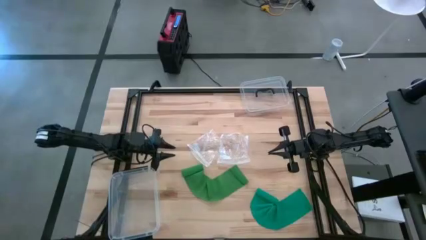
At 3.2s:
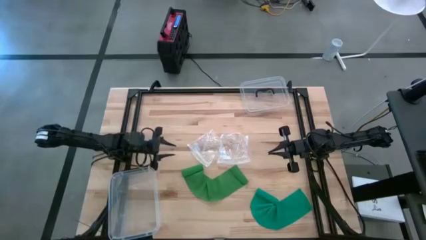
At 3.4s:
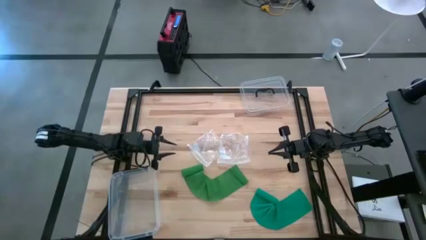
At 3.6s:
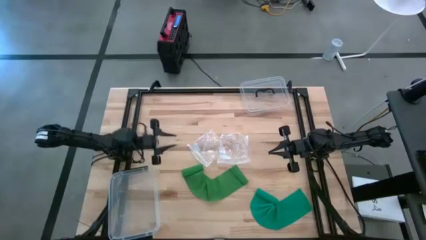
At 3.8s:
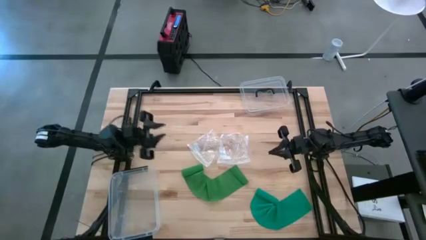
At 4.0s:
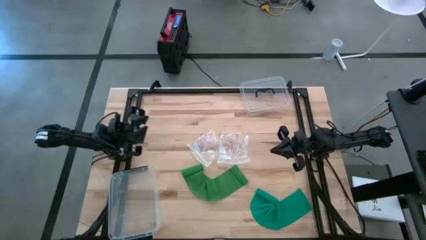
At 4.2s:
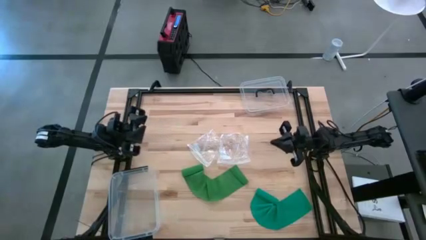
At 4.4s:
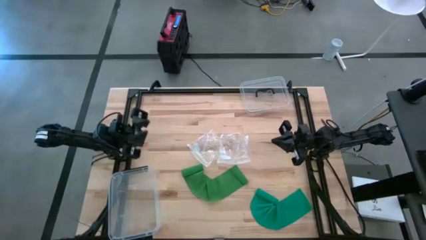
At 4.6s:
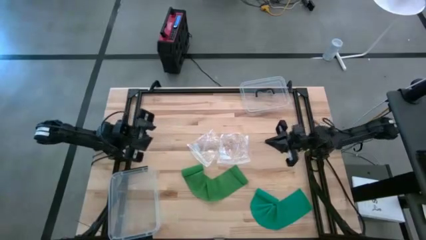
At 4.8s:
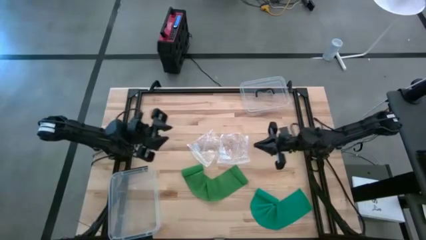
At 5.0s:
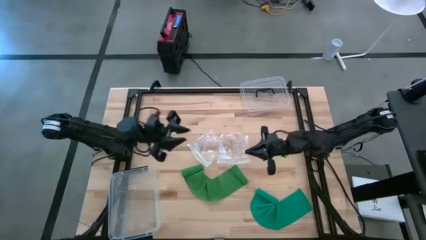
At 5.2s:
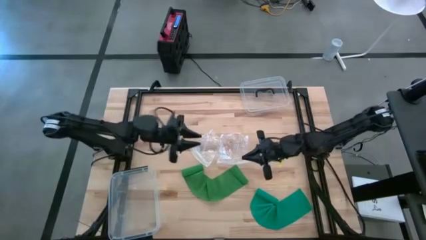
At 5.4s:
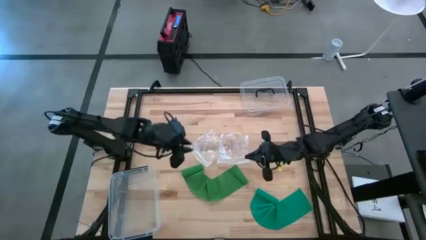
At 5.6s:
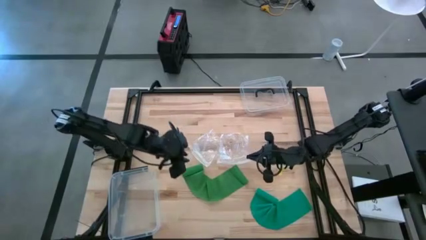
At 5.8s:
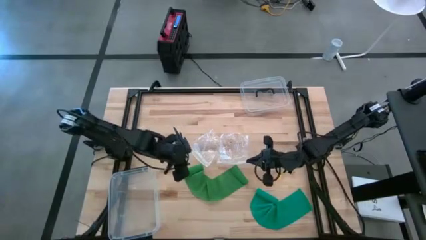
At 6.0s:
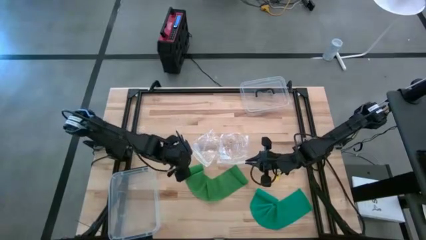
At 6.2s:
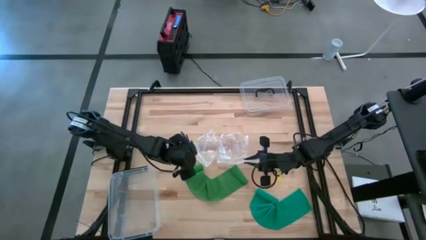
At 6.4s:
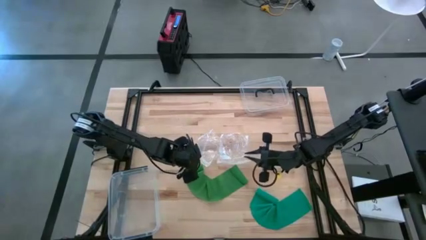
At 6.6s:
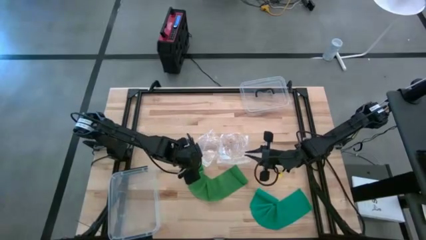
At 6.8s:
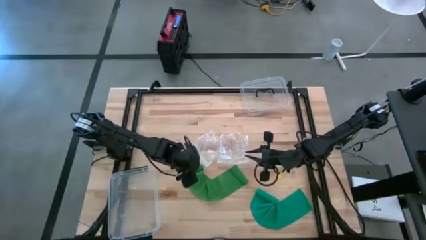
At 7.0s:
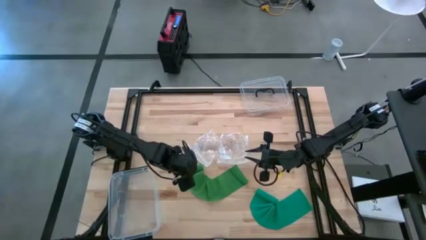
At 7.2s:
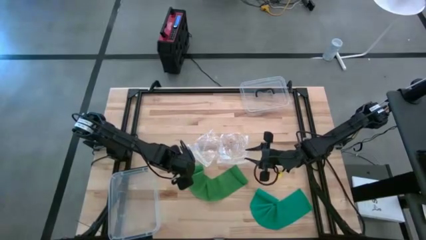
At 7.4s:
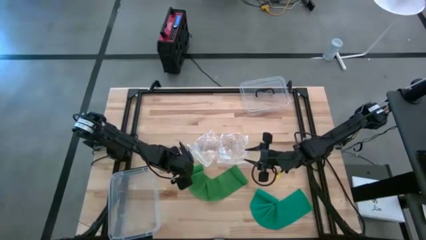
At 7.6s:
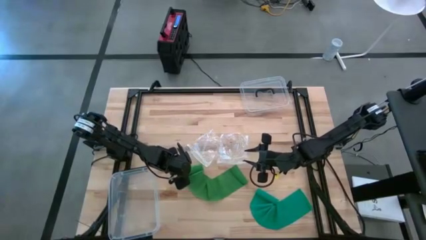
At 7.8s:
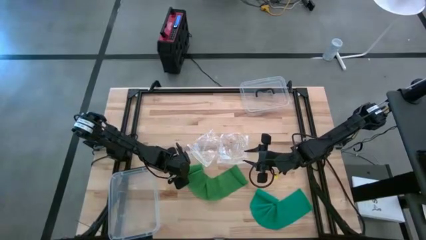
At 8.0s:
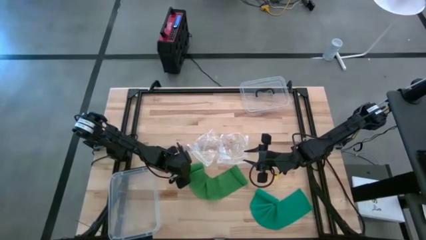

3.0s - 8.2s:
Task: Roll bandage
Roll the green bandage

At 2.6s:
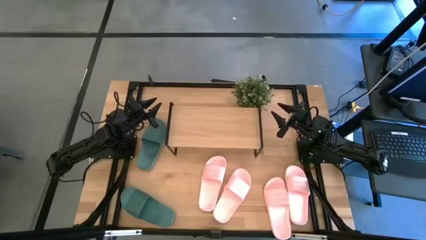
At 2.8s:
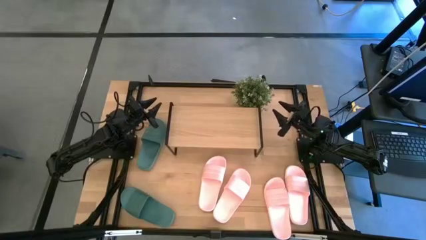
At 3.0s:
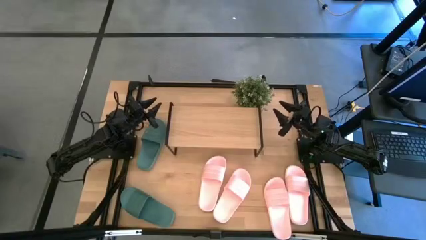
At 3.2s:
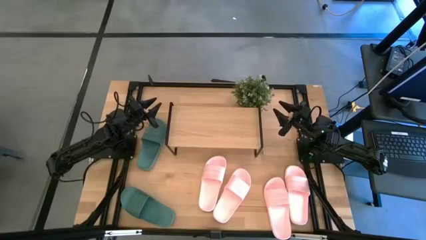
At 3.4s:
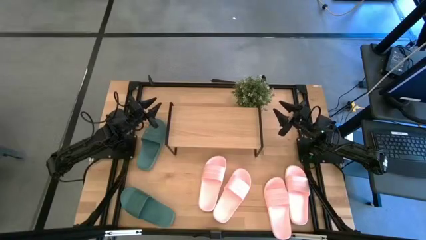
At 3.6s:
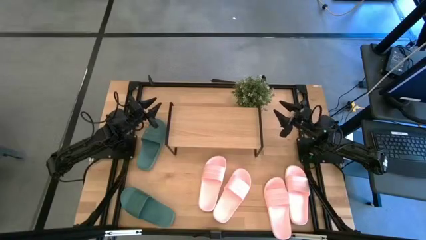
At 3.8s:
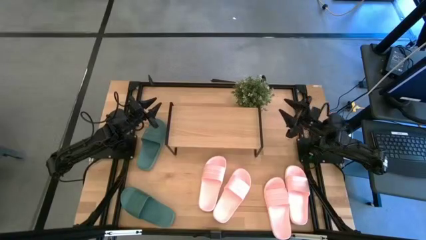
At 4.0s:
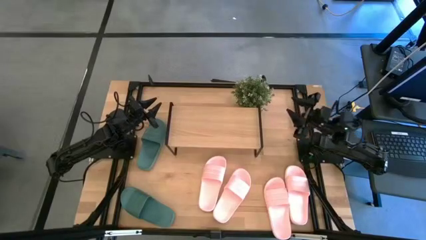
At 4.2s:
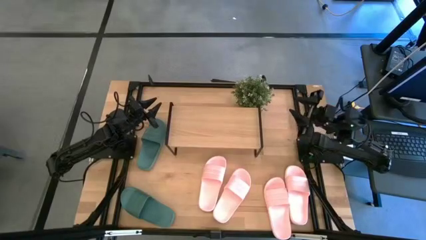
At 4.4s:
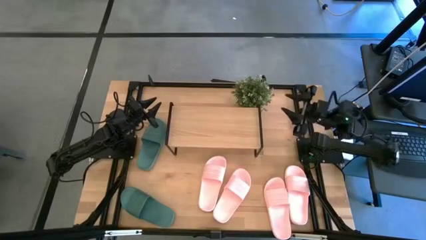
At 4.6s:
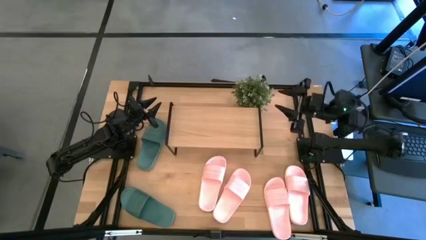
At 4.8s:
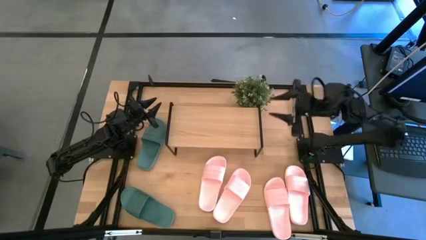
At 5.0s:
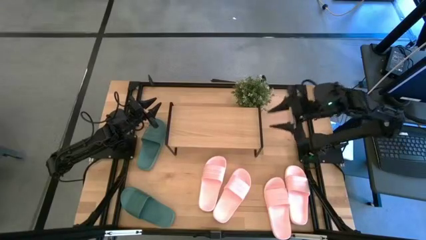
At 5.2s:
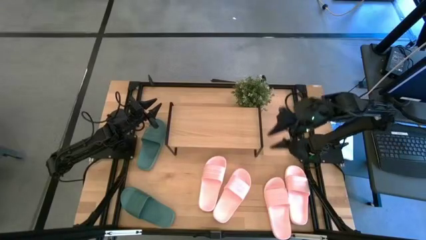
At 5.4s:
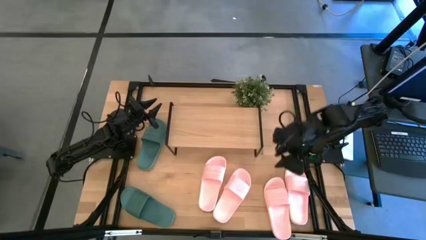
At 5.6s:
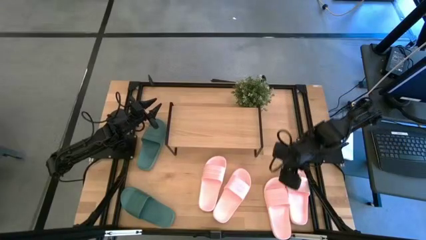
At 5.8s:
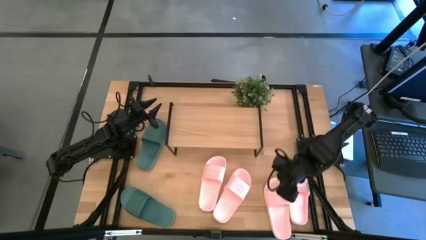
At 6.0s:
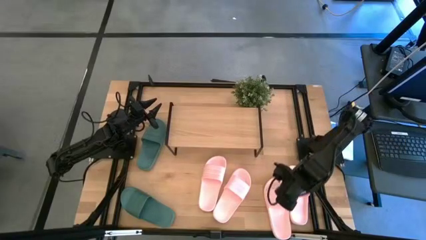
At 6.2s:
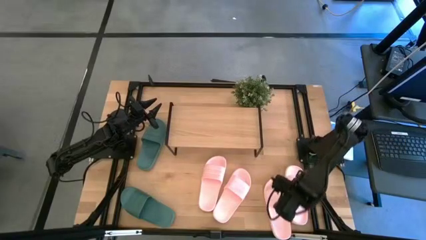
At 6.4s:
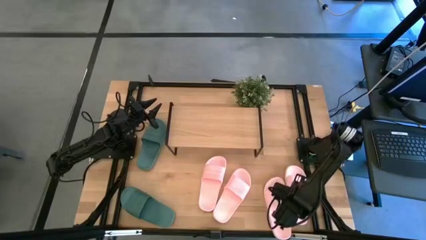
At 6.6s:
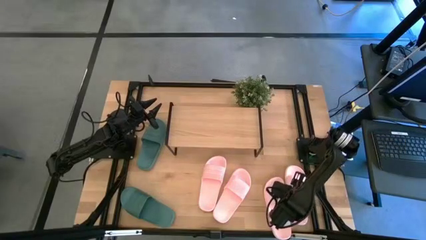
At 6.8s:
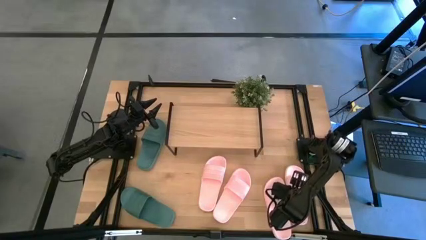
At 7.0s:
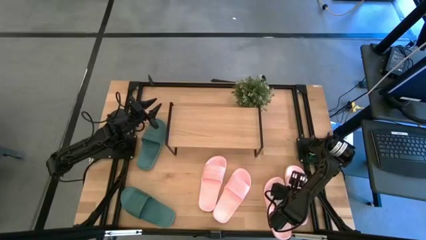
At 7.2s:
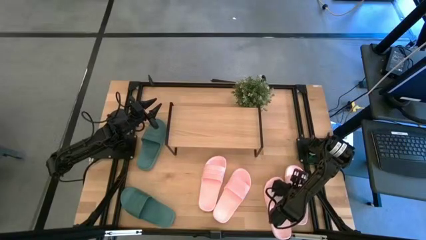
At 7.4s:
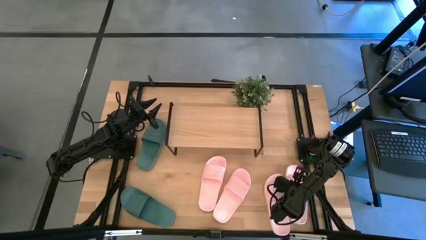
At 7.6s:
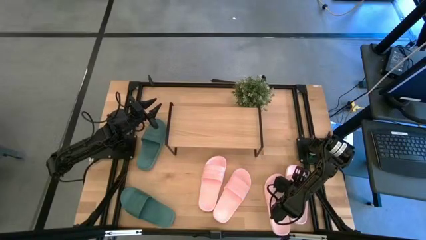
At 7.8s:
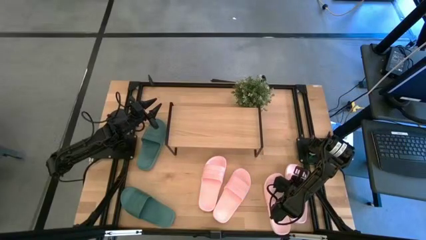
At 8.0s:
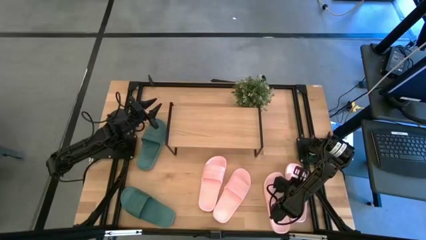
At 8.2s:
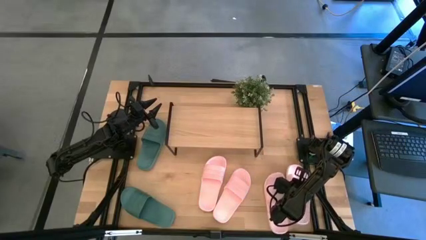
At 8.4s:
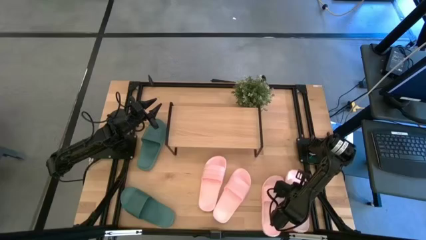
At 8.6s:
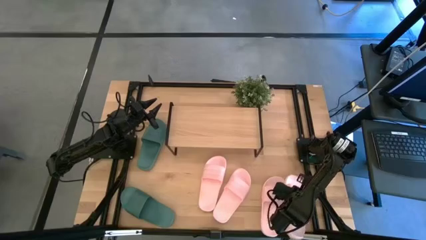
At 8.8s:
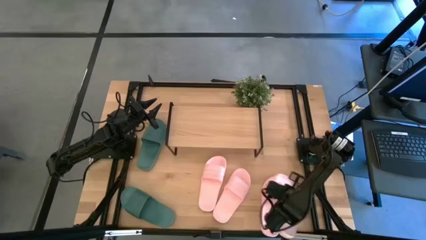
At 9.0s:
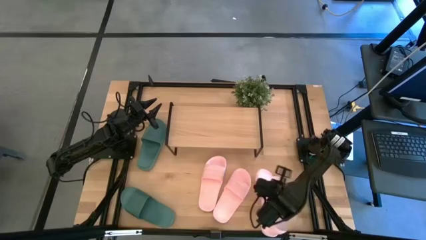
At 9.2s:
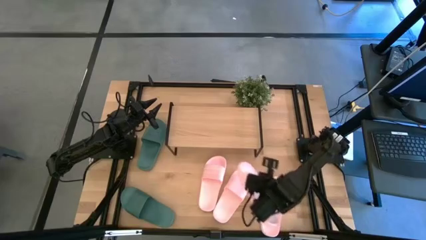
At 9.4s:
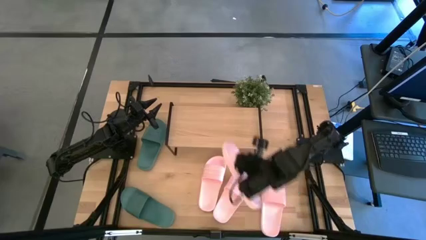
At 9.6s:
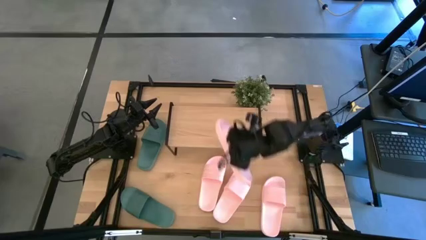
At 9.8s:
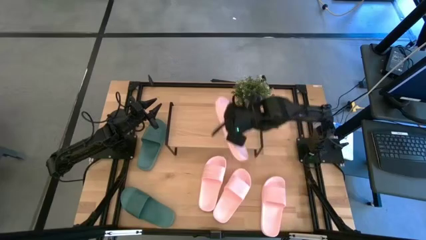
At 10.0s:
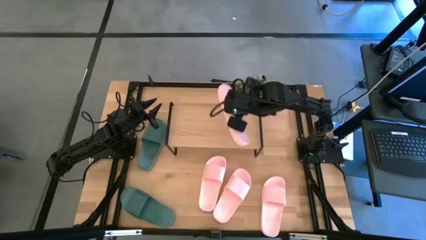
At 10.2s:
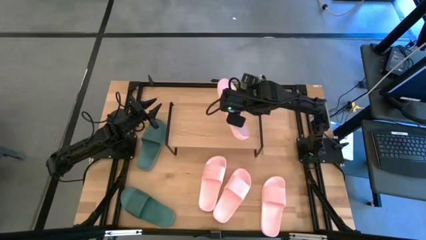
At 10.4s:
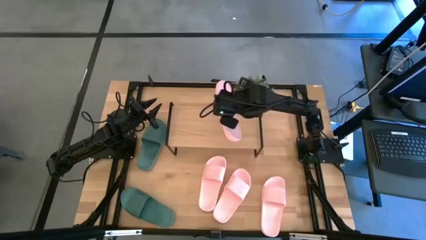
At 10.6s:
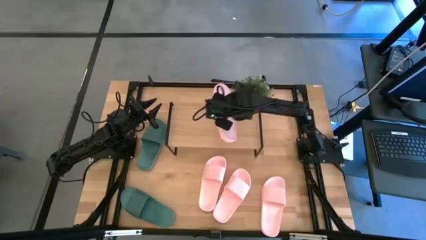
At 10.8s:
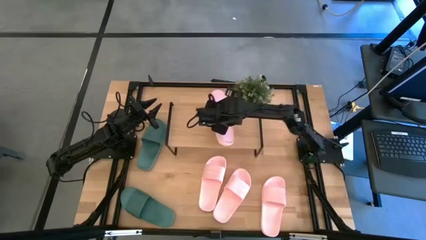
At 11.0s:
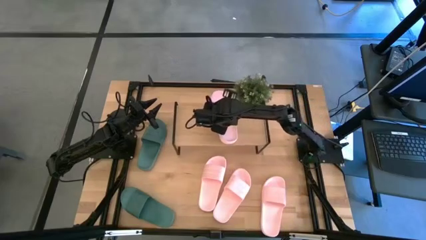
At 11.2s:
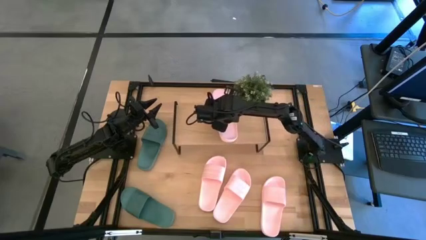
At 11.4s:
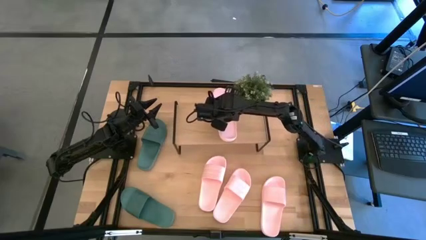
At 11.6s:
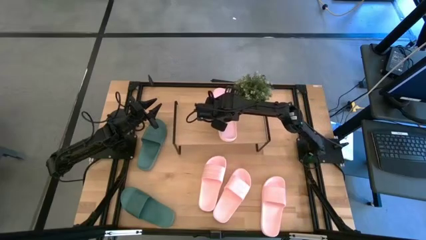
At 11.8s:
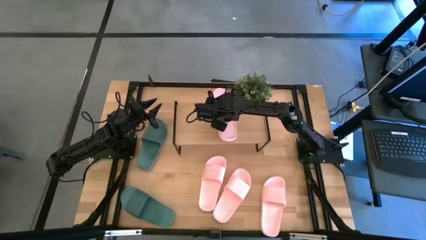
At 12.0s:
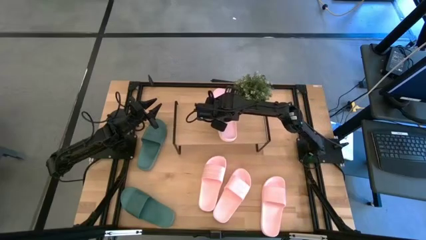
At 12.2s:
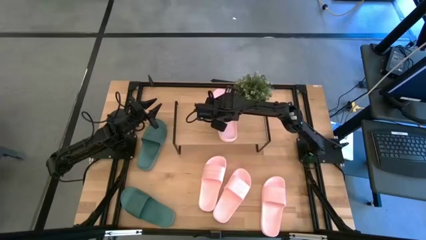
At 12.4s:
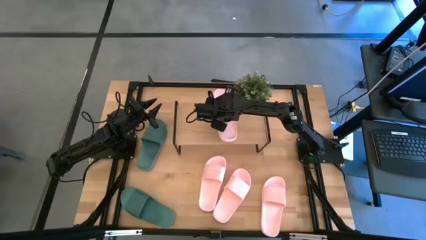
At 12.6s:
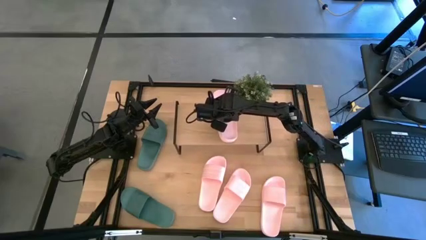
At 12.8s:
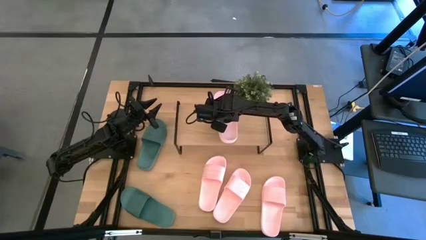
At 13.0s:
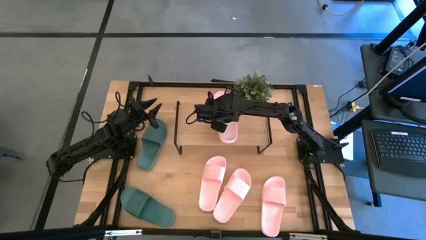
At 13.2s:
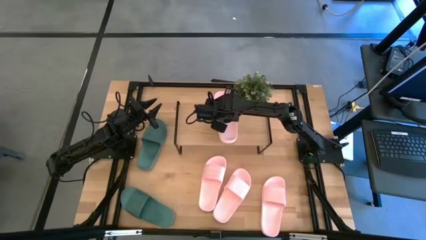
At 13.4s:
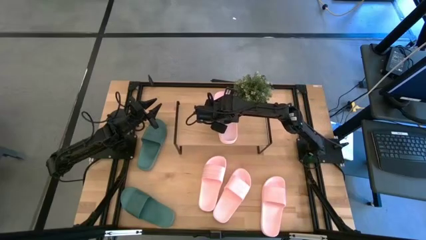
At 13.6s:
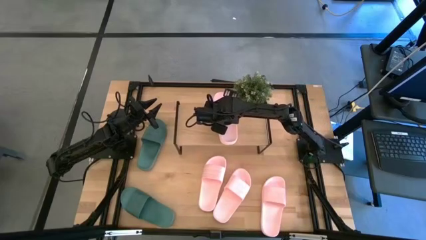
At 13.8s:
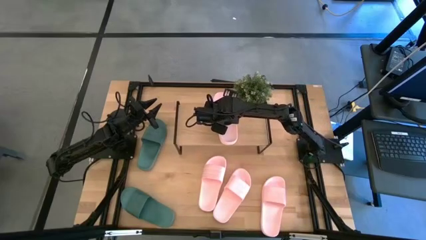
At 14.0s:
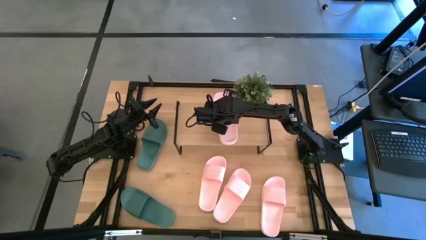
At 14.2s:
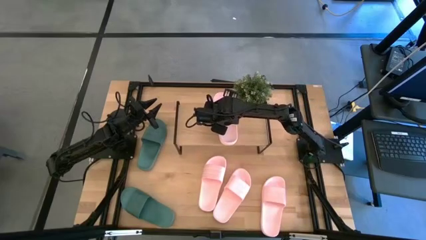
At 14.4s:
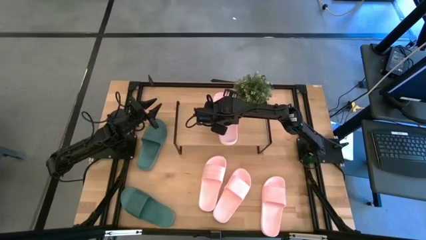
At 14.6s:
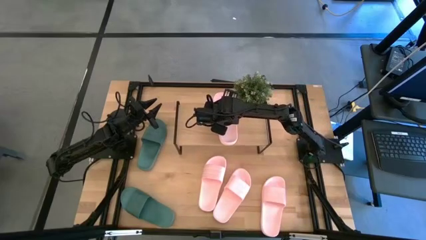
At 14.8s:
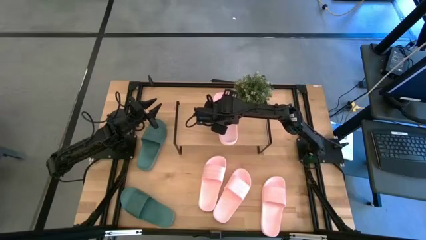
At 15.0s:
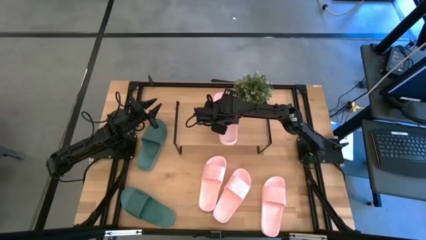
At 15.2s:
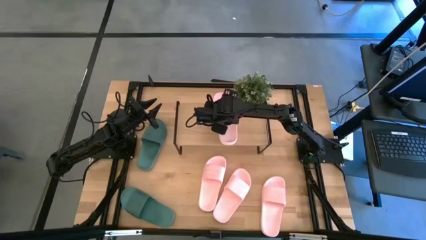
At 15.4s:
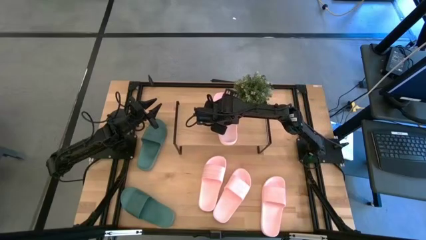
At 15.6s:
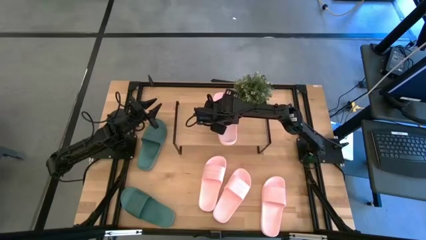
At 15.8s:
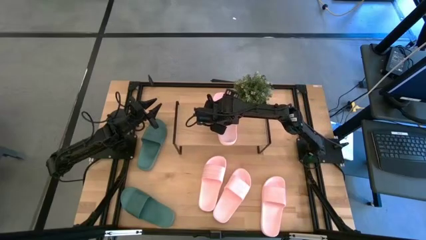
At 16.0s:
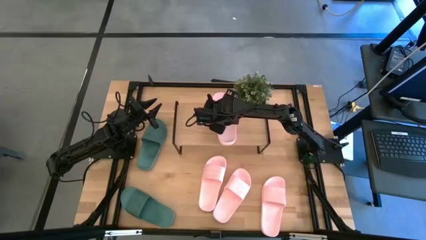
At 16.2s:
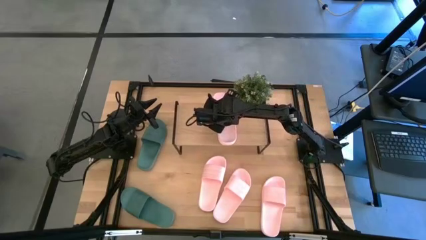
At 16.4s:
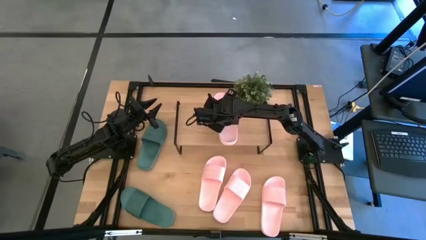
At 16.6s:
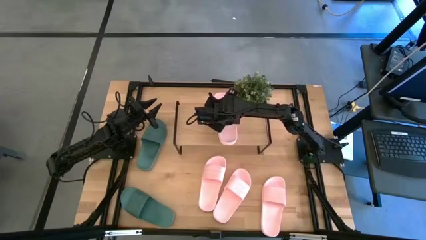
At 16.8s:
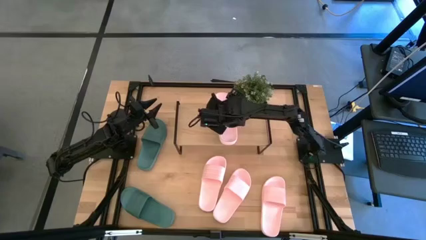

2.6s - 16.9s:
Task: Pick and place slides into the shelf
Put the pink slide on the shelf
